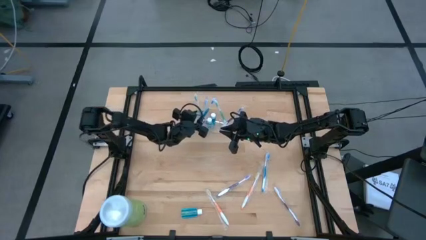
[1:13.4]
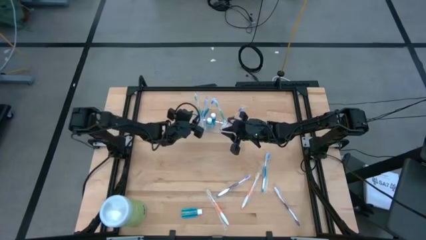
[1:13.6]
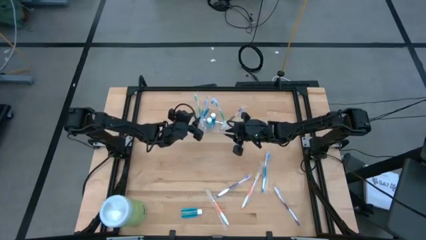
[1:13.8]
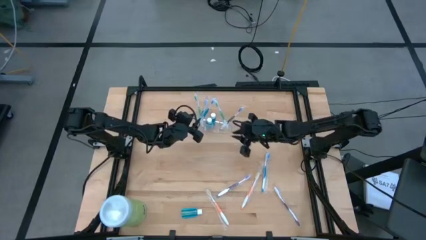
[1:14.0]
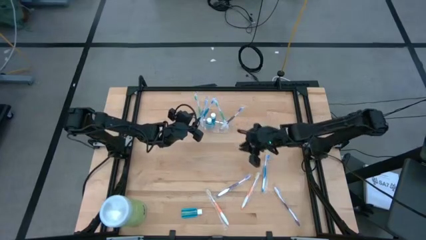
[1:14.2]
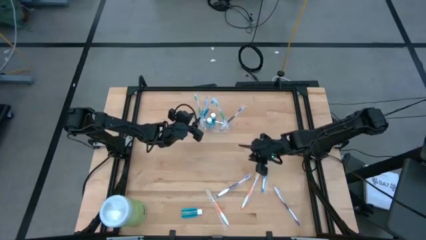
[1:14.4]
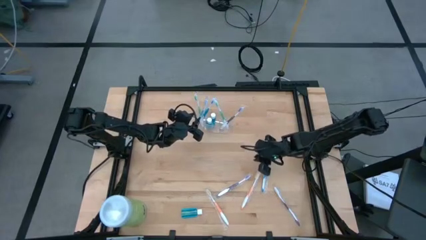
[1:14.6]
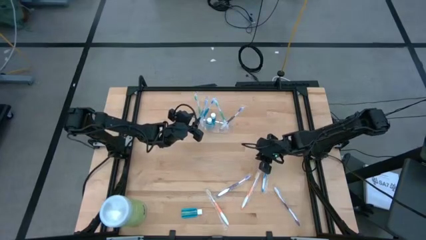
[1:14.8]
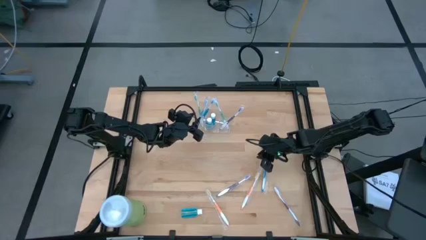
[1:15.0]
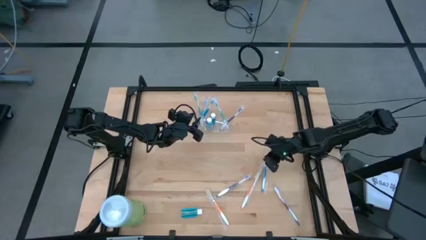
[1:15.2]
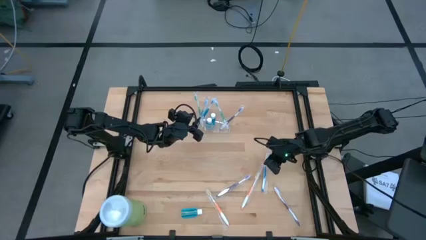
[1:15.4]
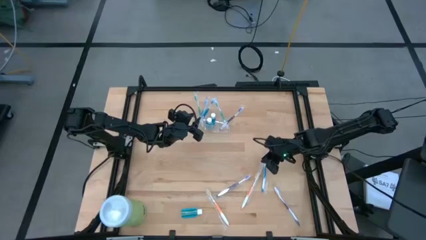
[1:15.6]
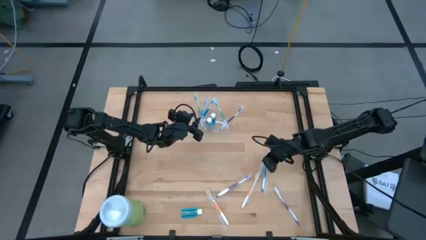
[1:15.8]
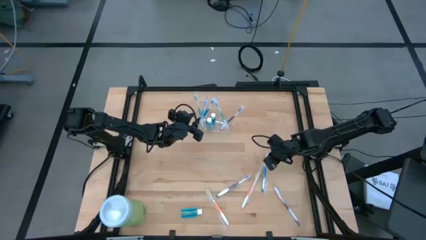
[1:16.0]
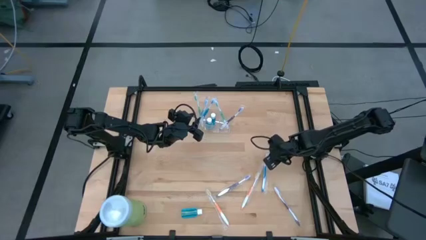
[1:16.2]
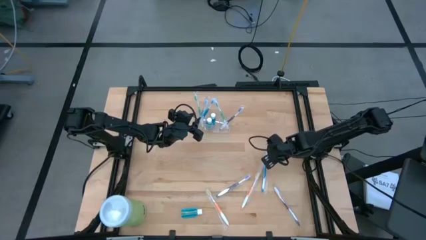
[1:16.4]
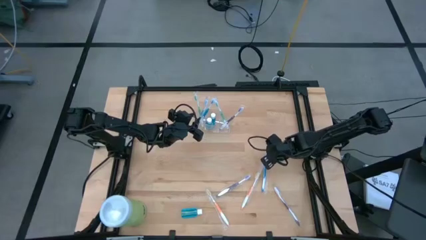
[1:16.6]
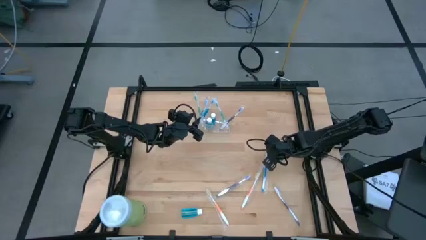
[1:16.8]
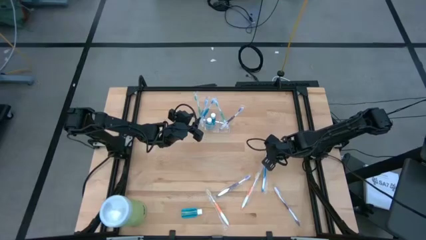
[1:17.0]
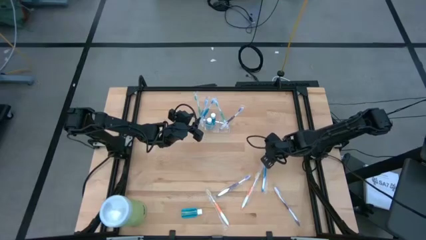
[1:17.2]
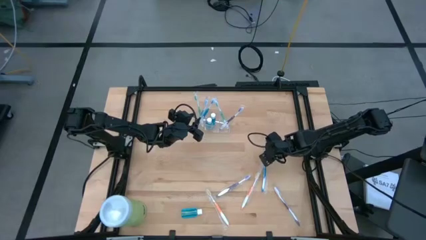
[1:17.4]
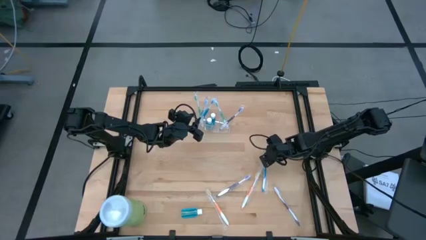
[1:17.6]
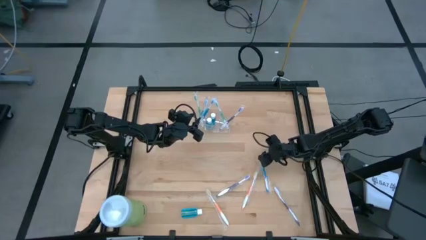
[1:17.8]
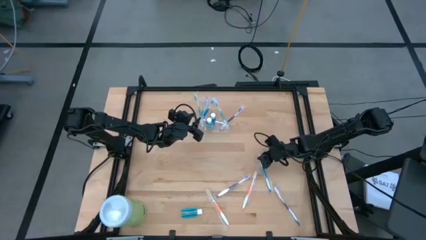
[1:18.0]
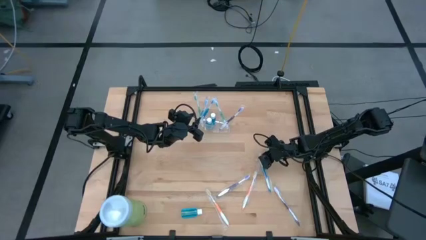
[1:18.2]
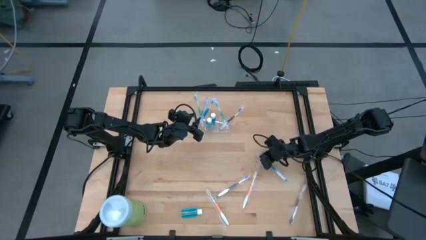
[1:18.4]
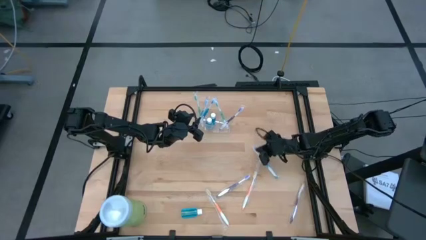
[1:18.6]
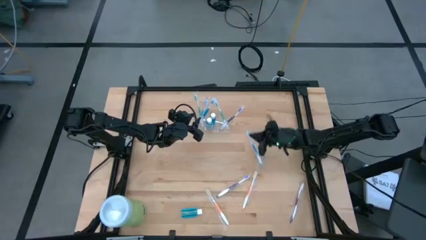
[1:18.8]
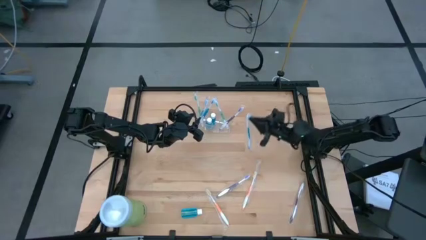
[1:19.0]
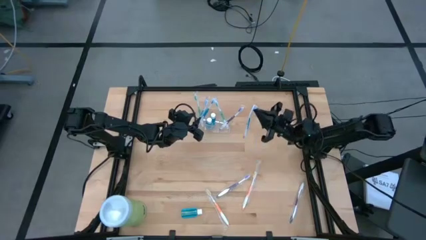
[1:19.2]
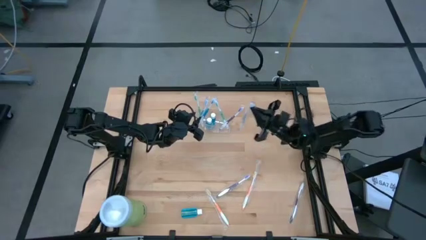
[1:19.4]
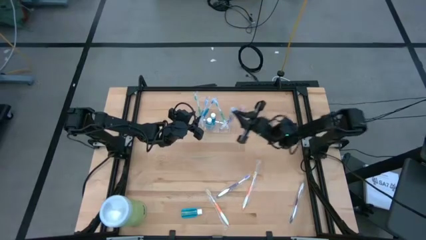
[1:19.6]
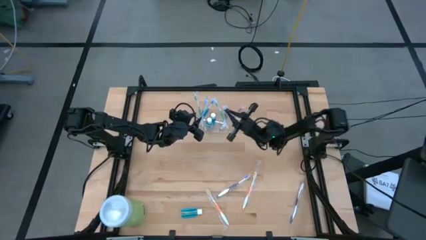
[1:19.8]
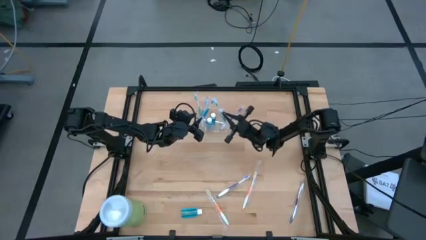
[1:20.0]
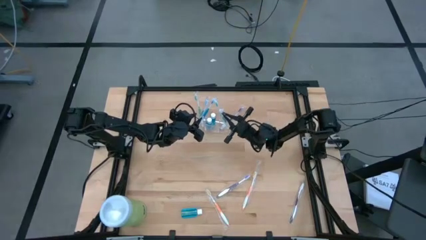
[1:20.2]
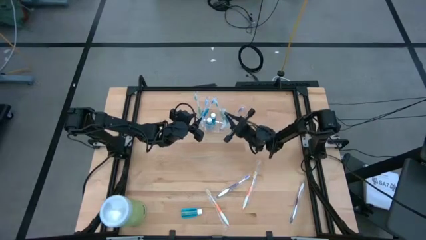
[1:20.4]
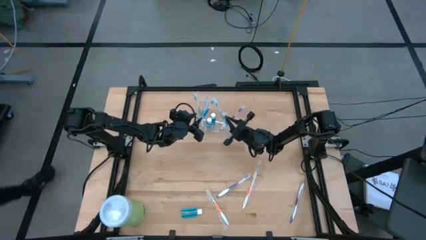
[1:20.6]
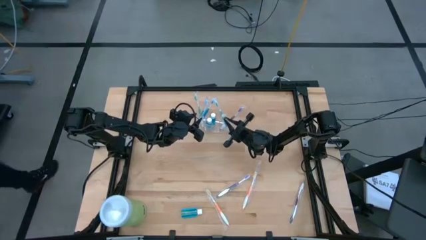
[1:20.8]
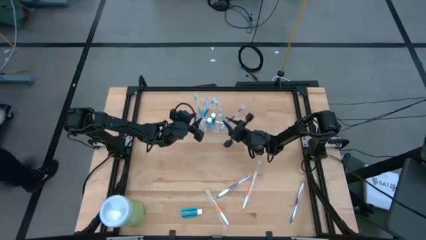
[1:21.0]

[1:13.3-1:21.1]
Task: Pick & Place toothbrushing station
Put the blue toothbrush into the right section of the transparent organizer

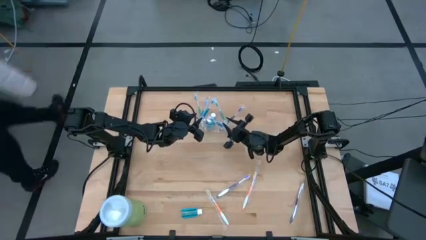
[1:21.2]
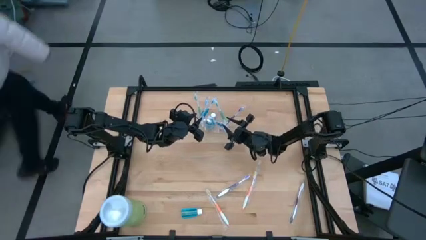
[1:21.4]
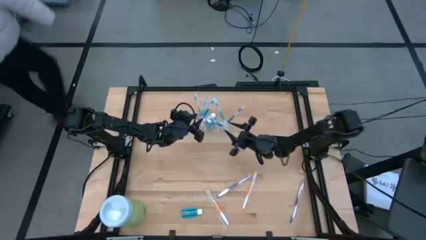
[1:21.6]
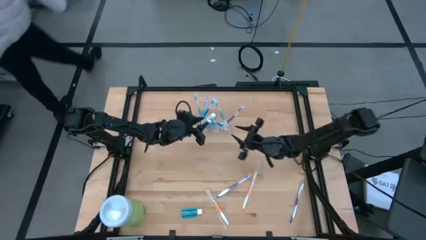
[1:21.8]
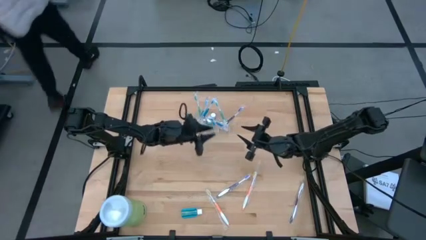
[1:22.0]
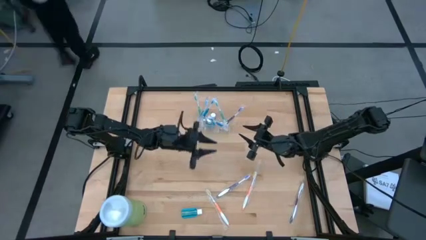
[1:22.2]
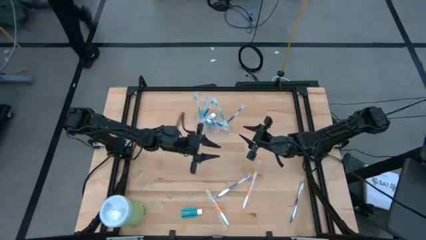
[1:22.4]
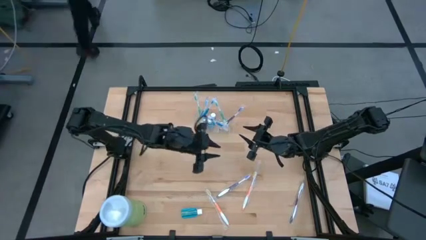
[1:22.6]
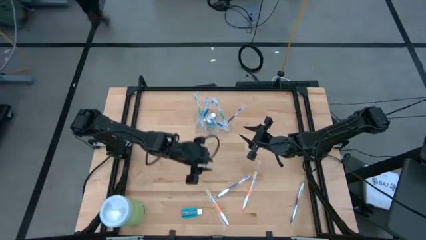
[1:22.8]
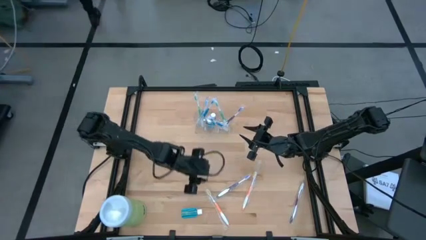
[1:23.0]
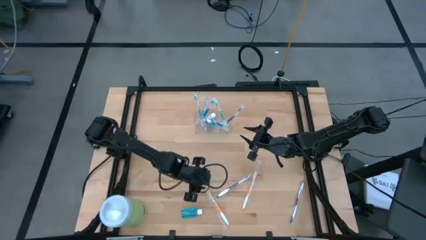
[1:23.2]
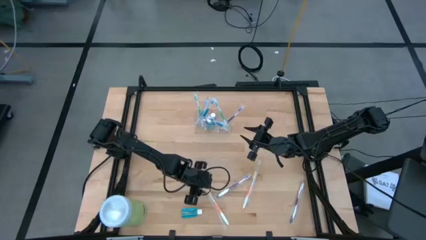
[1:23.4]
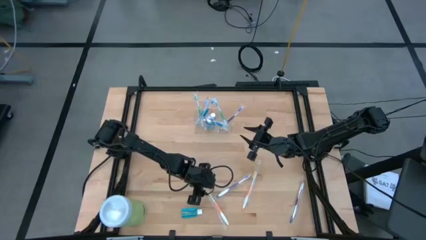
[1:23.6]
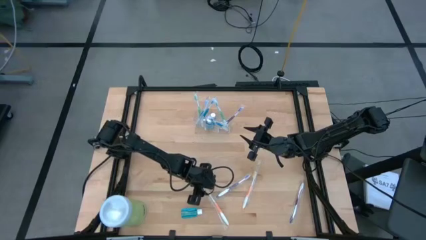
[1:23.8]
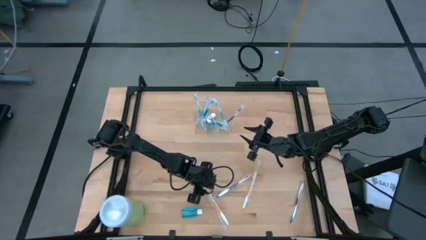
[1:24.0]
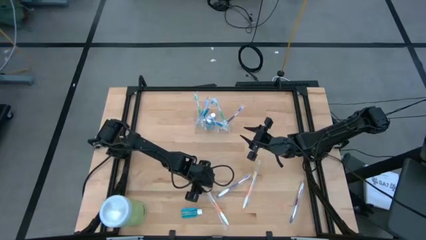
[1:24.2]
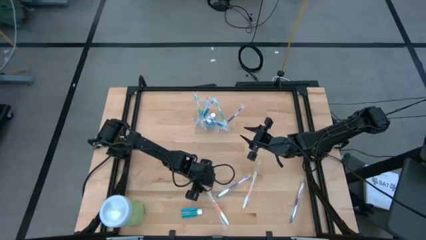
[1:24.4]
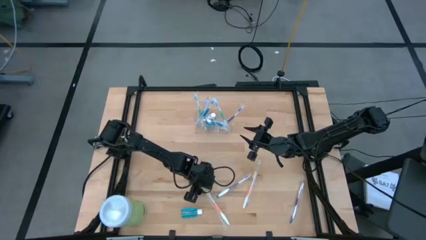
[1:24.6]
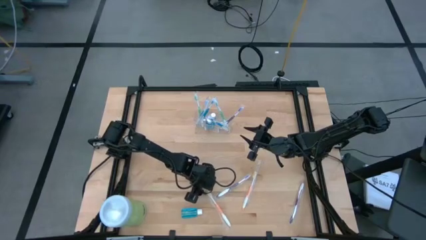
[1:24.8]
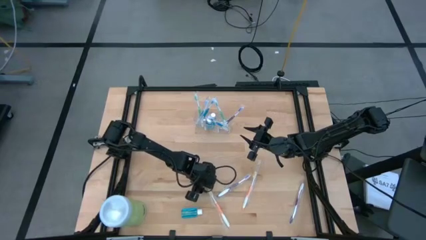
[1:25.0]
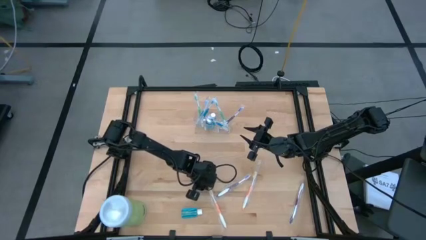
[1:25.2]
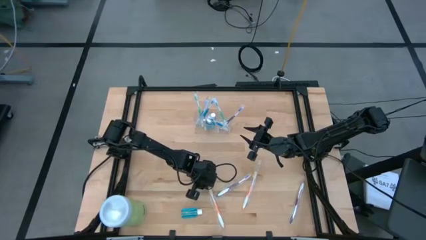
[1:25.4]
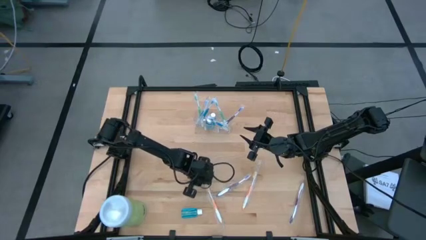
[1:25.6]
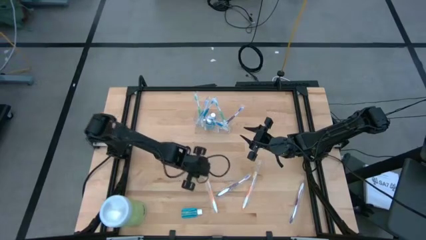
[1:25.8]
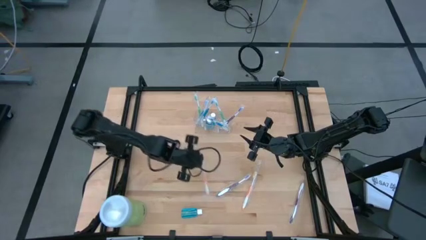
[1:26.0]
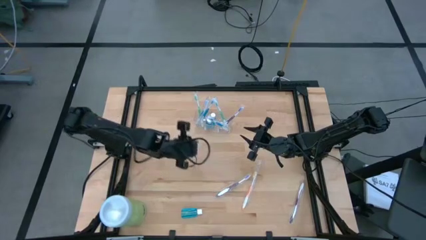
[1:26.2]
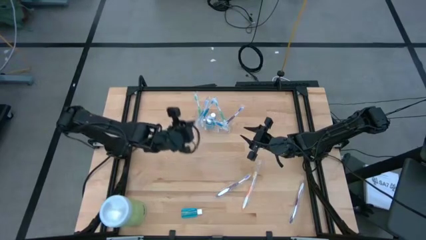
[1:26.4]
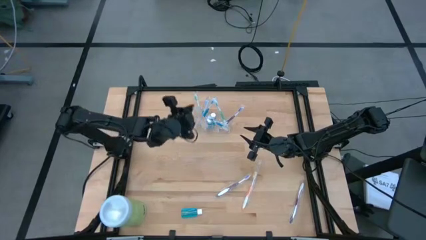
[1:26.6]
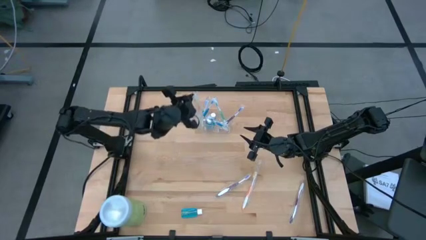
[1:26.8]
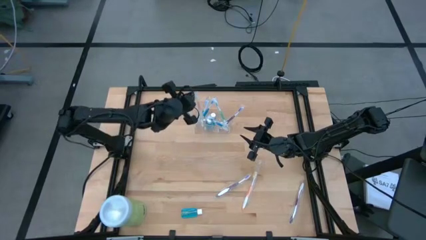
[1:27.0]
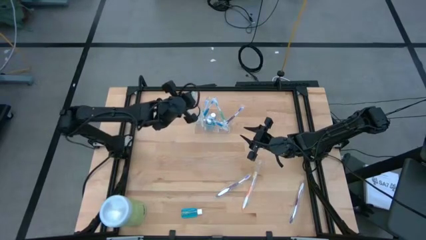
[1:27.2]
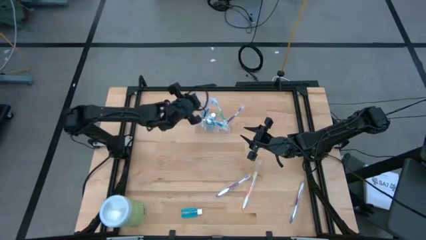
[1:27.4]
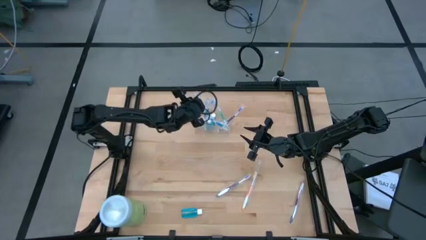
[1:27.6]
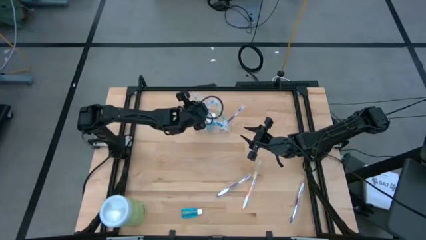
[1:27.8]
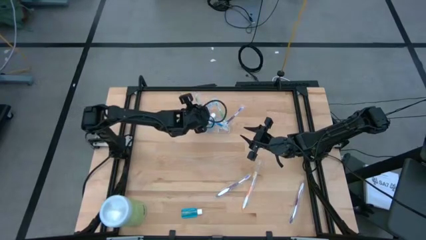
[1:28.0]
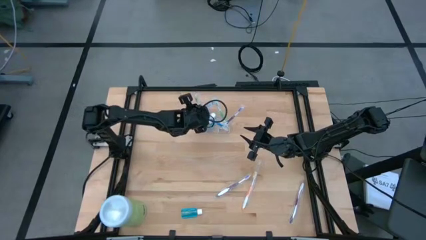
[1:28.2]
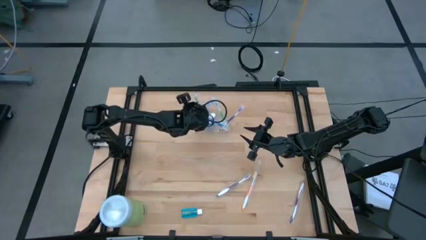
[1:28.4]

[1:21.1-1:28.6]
Put the left orange toothbrush into the left section of the transparent organizer
